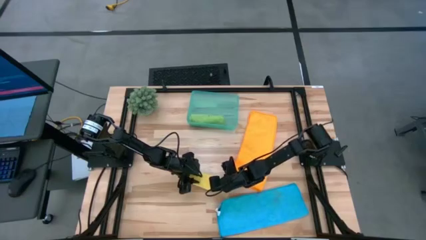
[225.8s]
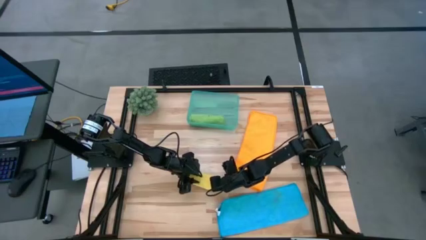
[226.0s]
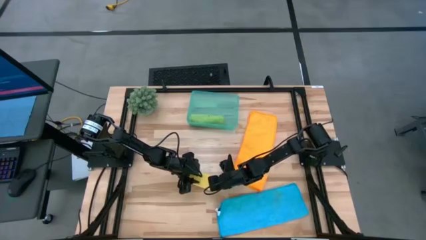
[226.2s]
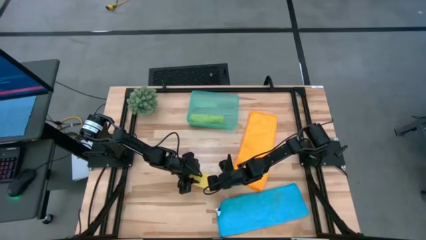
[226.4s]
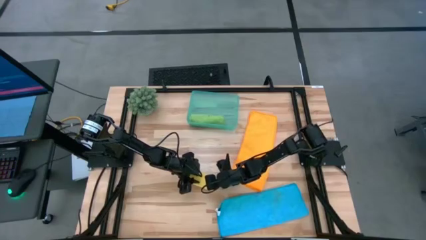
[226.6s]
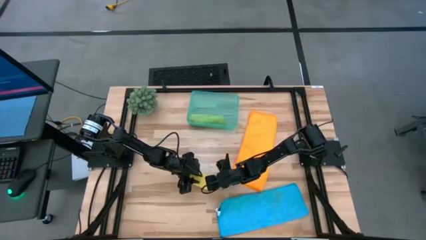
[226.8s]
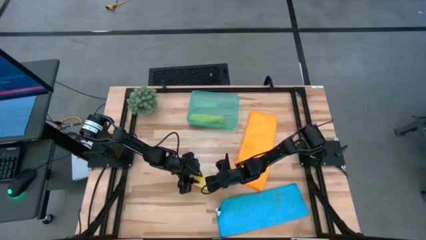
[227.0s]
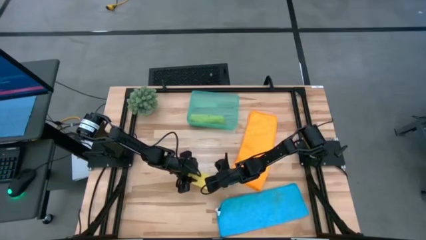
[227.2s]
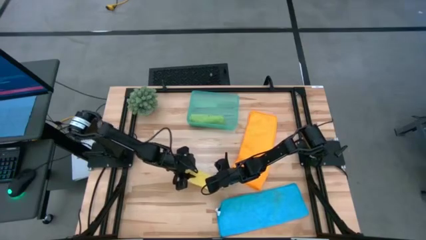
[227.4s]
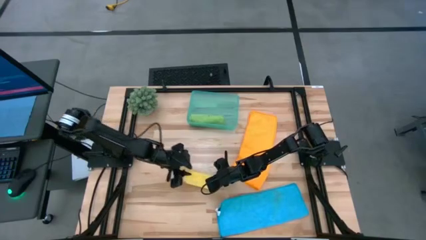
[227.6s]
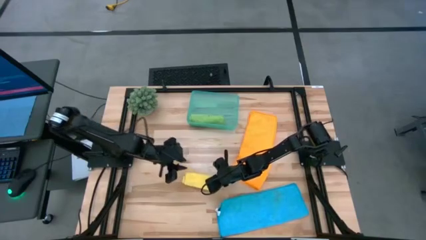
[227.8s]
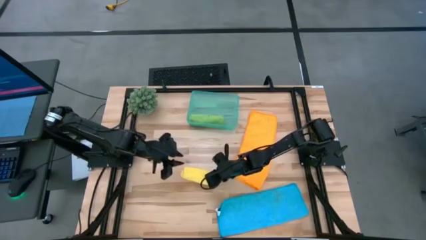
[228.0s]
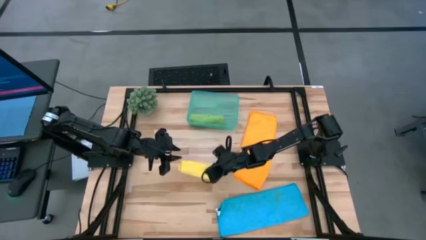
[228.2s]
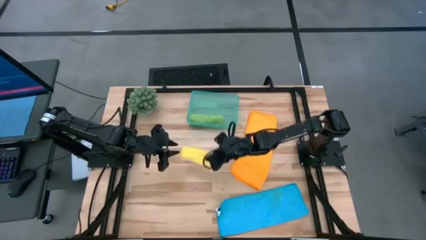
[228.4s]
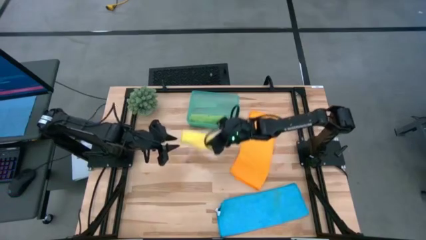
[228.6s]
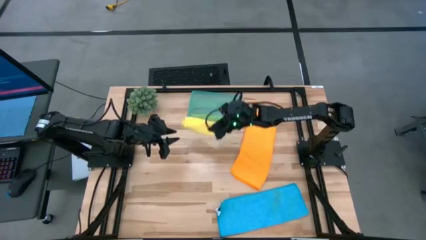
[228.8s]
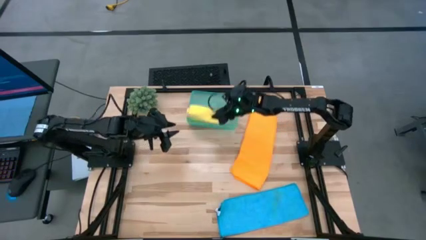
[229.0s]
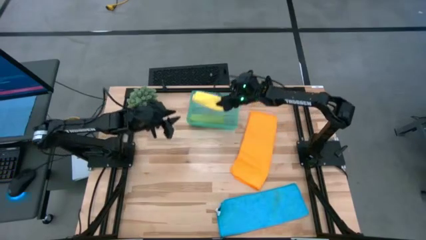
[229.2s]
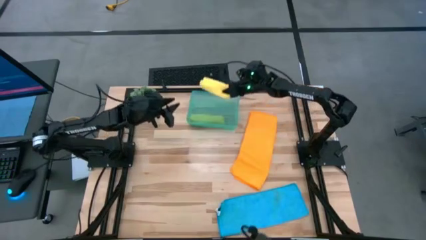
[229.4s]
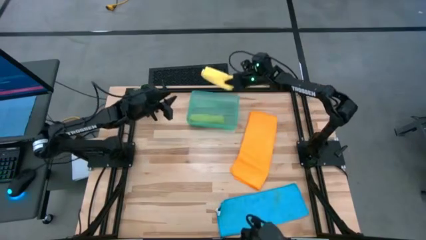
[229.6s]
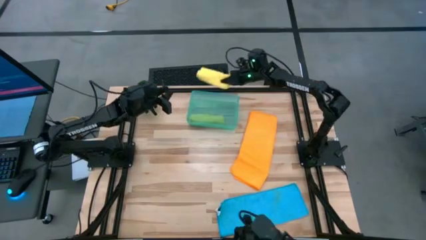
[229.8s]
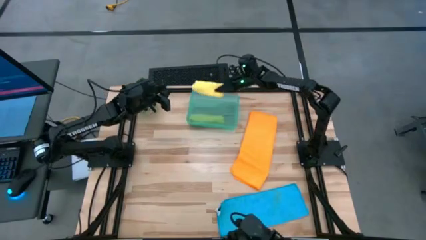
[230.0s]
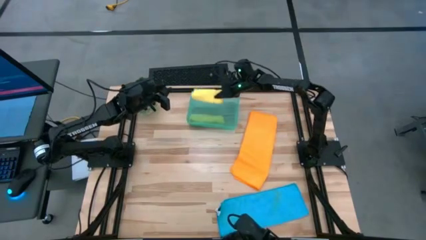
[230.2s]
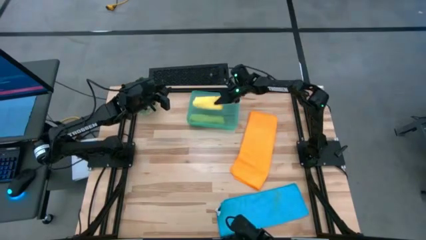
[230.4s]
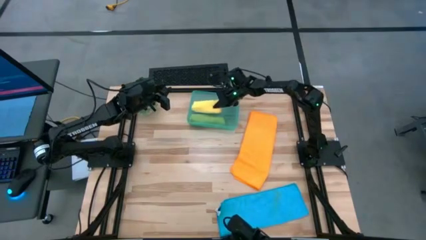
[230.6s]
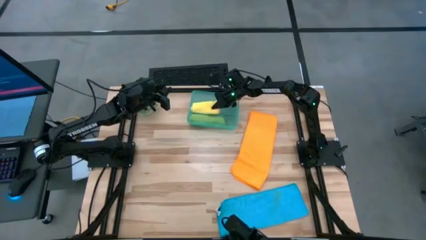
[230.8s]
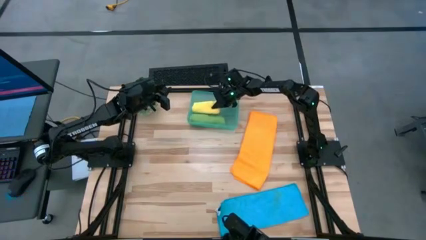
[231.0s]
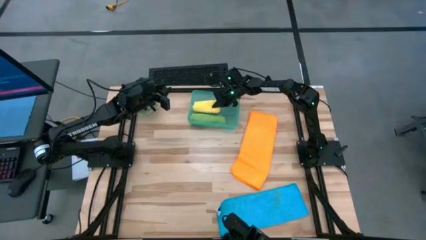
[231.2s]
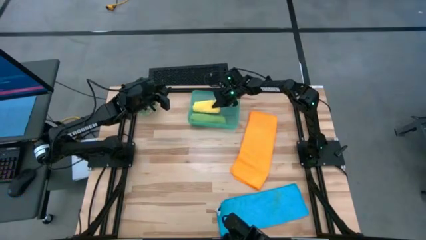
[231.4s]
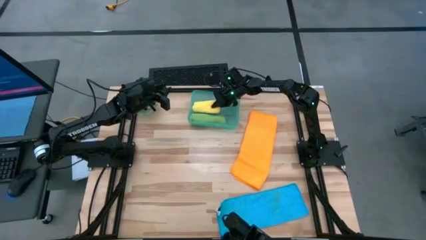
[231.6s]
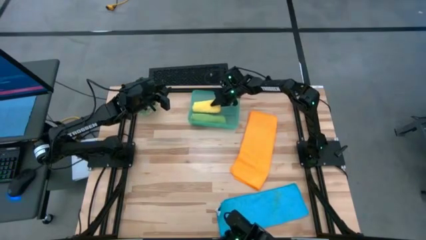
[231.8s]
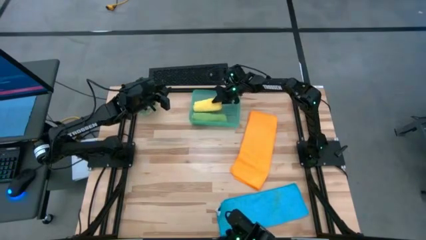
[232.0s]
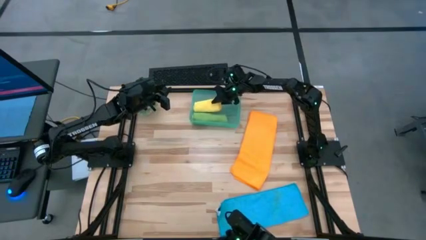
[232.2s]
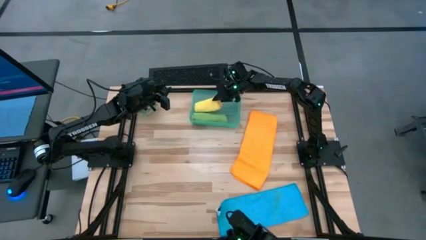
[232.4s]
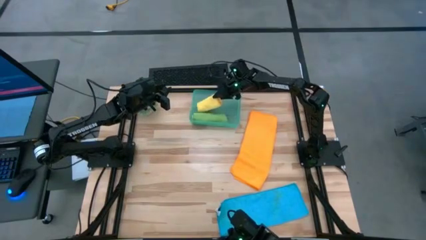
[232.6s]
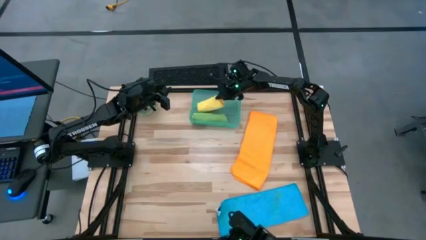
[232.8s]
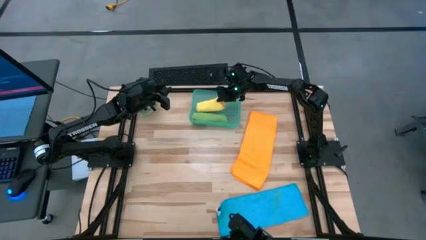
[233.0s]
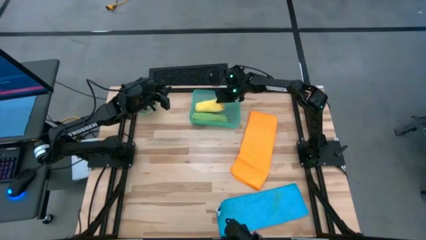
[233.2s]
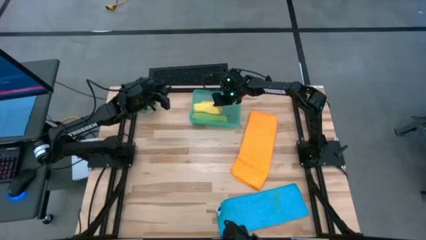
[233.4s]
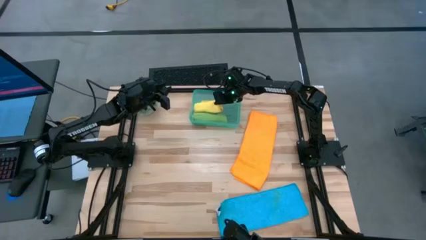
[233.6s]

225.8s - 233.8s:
Task: Roll microfiber towels into tight, uniform cylinder then place into a basket
Put the rolled yellow towel into the blue bin

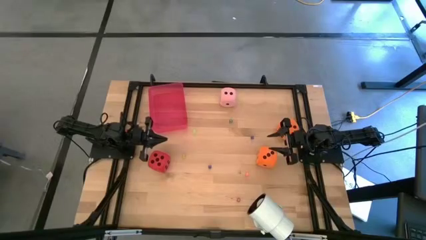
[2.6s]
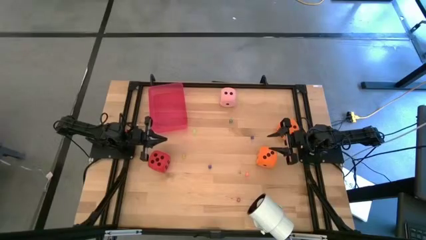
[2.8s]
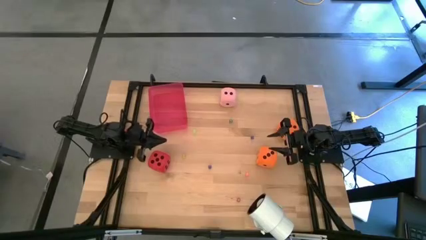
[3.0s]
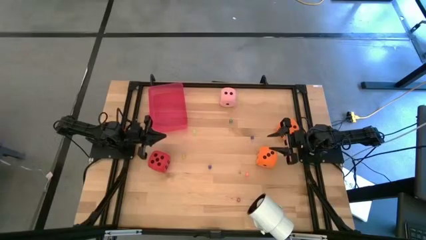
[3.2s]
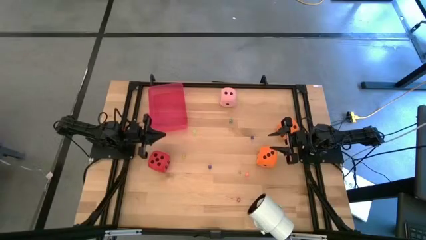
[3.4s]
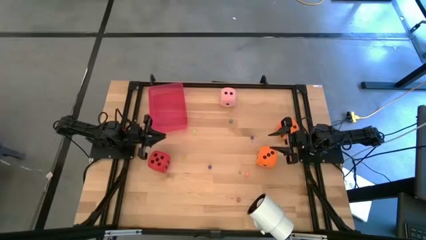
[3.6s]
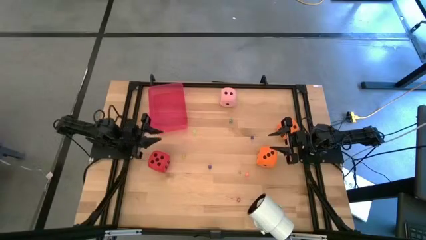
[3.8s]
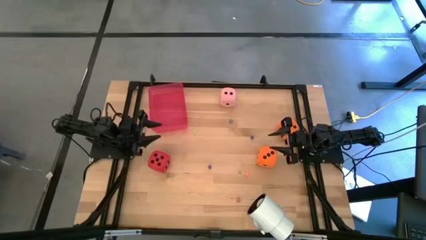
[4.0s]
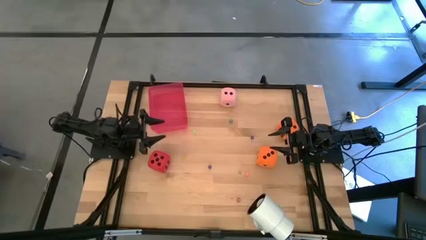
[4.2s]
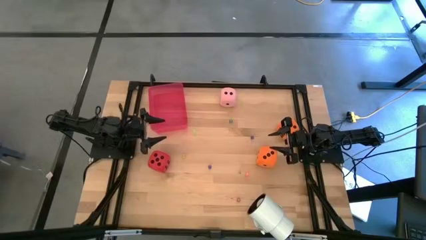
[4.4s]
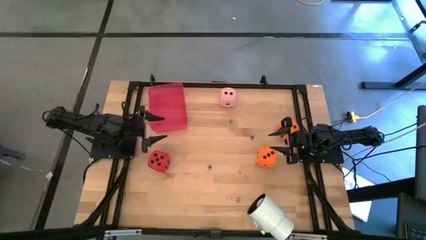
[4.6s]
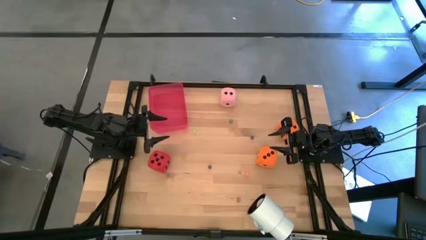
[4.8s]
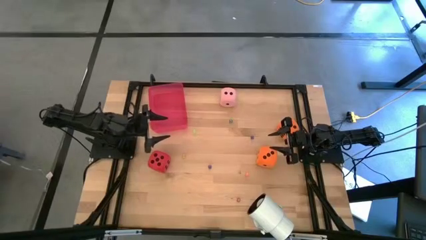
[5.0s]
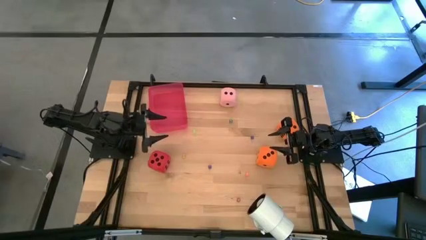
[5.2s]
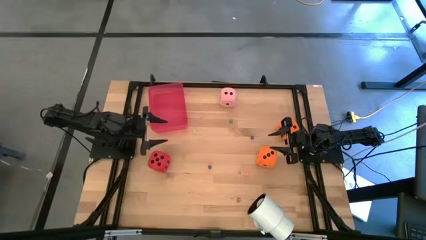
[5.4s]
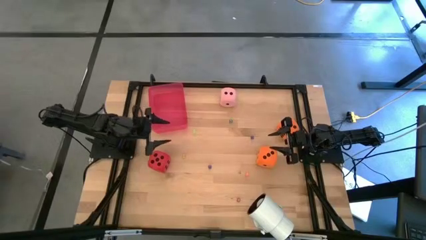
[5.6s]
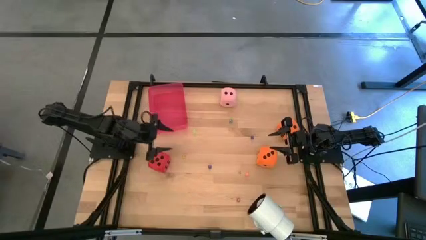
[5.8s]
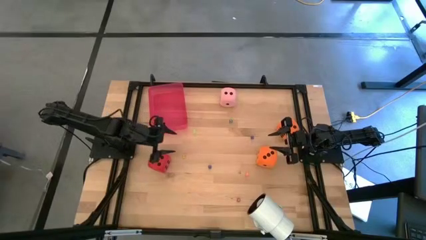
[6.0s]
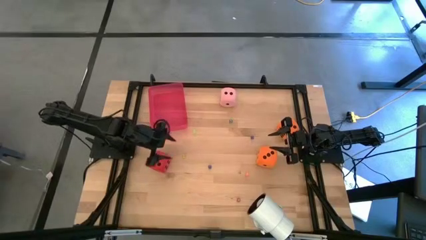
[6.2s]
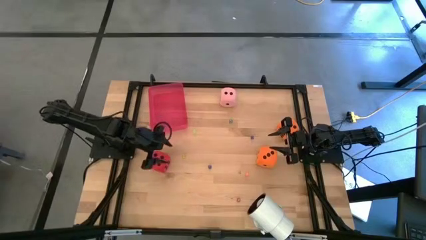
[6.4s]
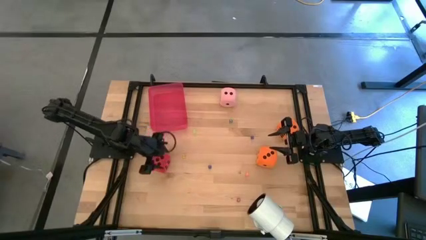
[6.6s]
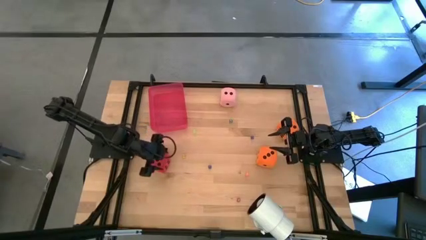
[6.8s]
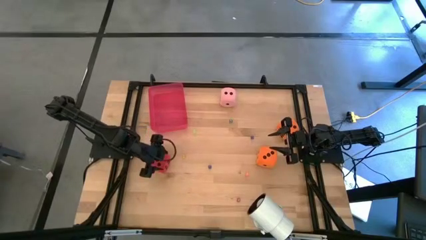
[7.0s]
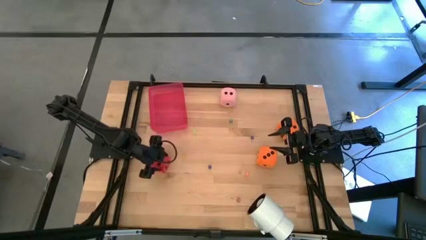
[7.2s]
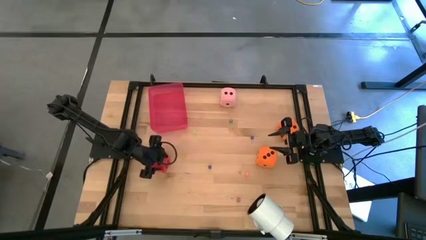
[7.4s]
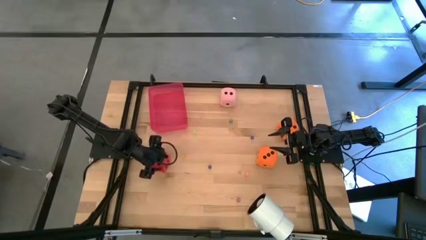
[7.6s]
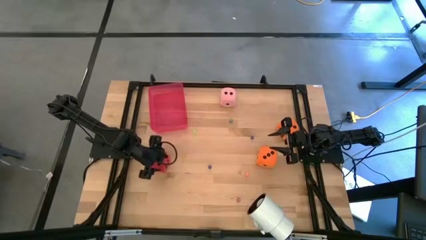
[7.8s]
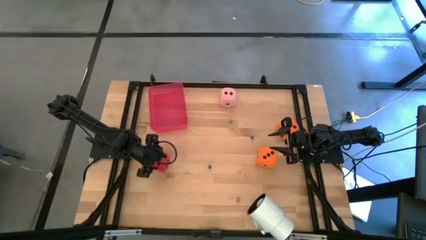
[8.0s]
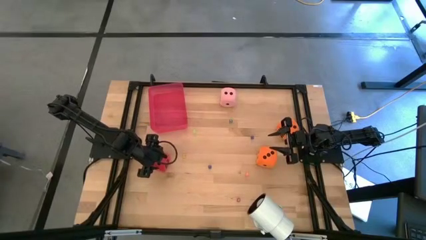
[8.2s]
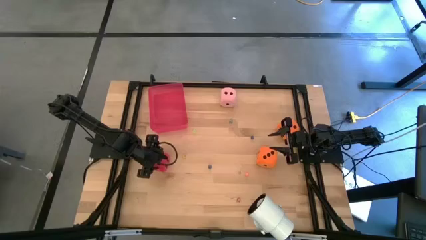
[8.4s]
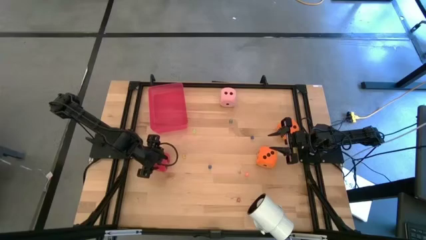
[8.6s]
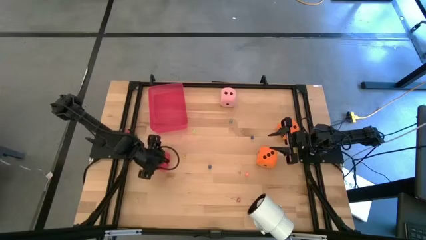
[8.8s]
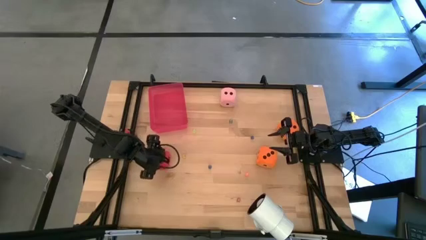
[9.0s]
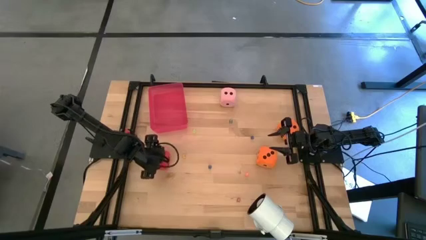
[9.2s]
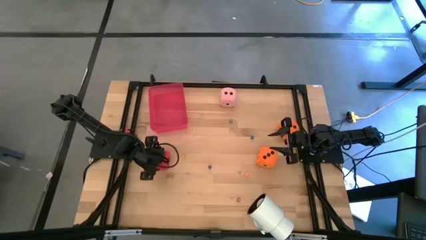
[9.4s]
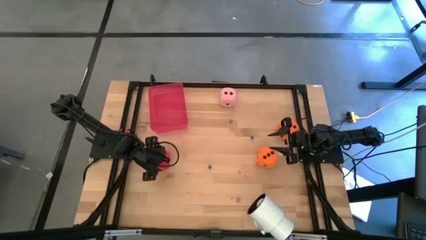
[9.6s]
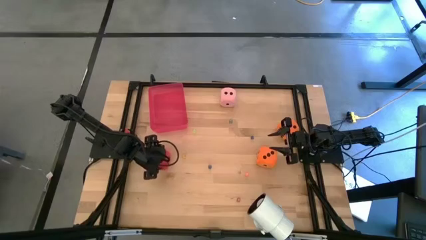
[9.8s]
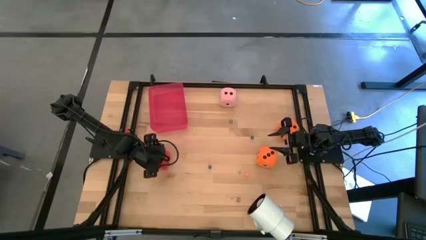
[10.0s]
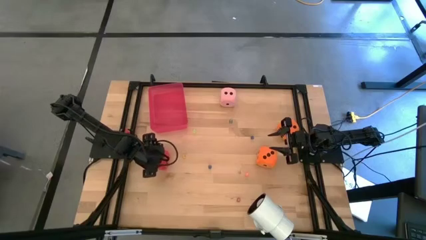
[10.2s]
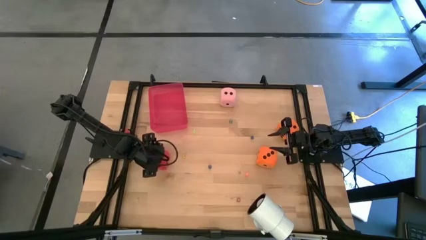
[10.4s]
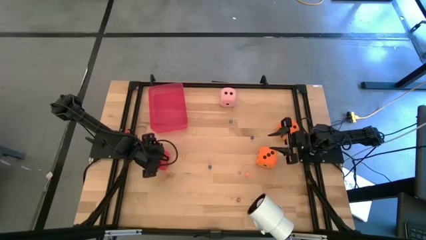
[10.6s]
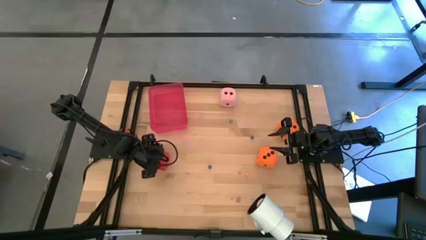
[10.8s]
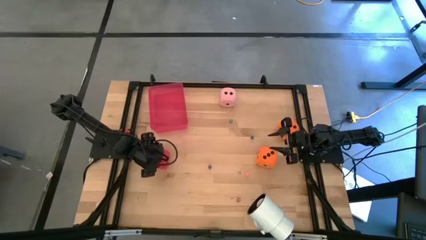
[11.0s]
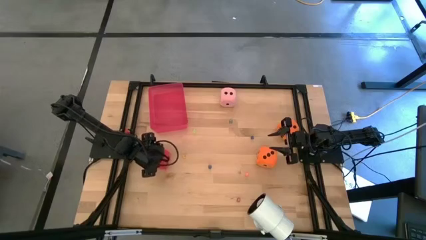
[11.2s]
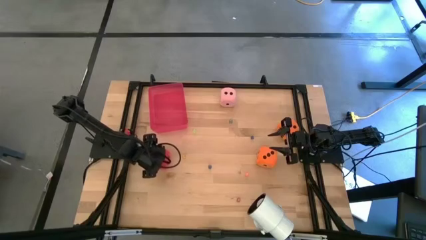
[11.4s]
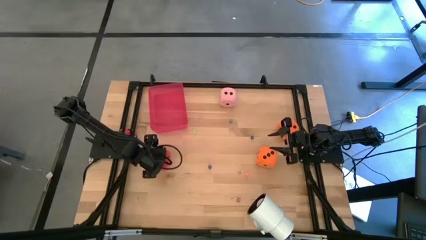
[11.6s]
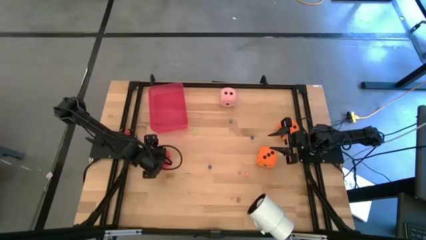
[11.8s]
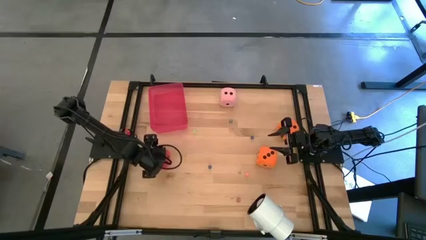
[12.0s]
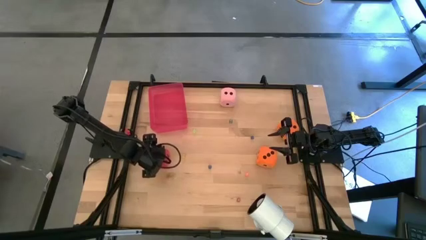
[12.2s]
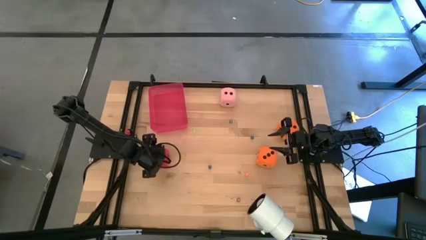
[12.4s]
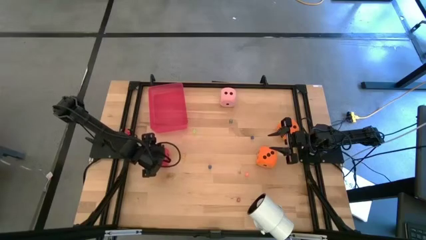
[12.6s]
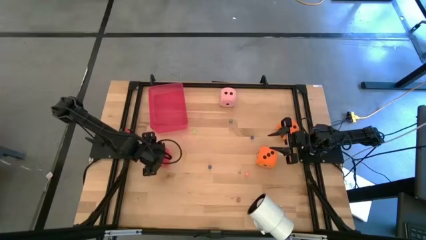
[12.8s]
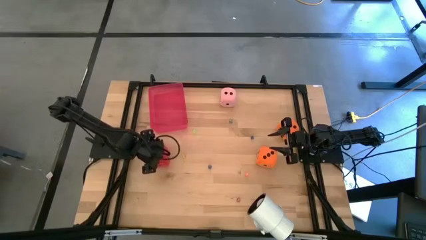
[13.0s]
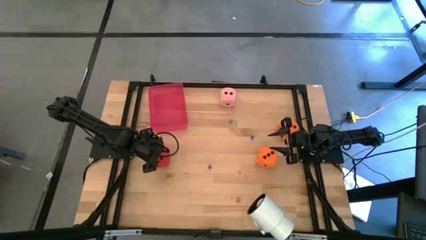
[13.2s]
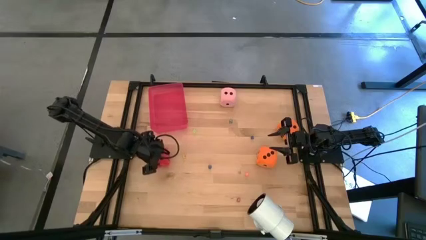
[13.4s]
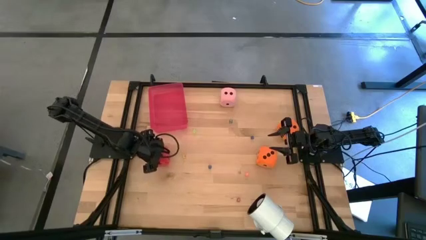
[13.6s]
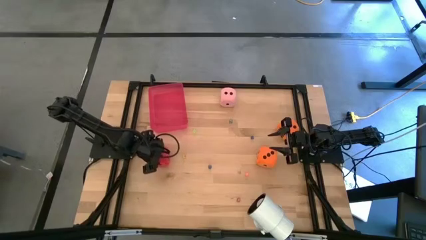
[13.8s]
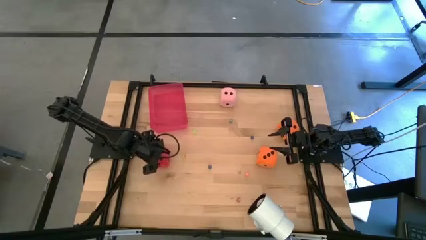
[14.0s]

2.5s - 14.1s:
Task: Pick & Place Dice
Put the big red dice into the bin
